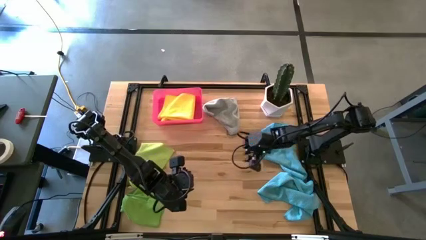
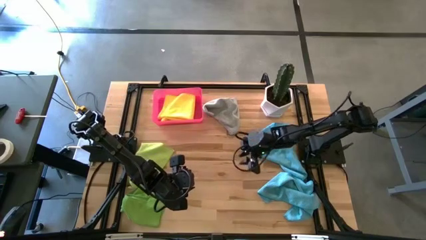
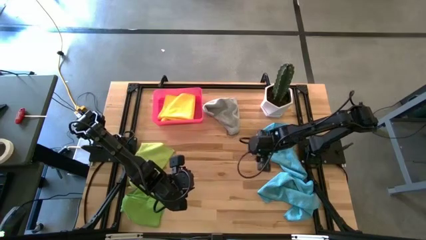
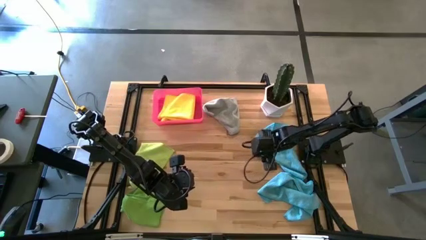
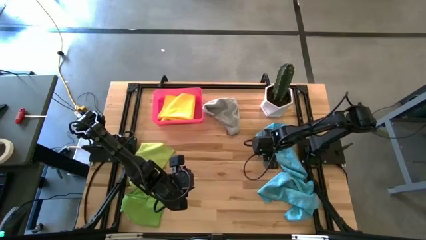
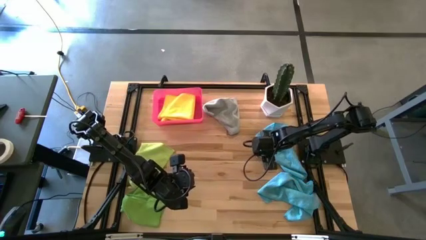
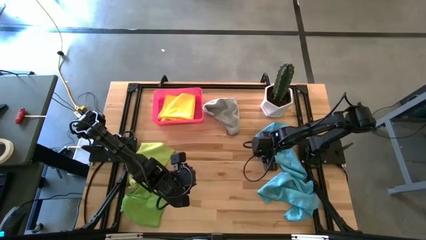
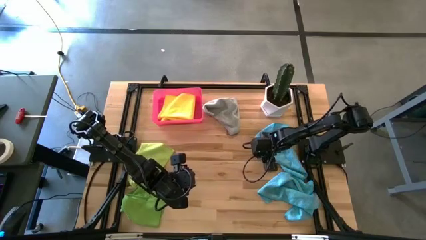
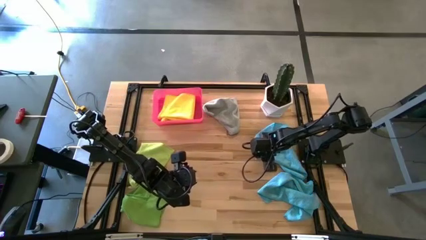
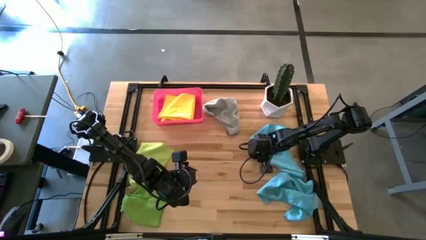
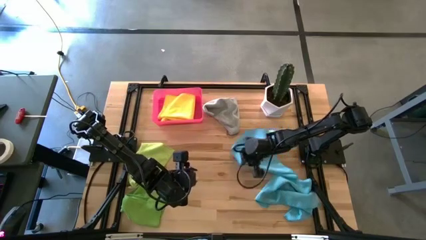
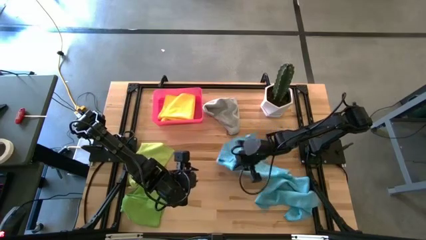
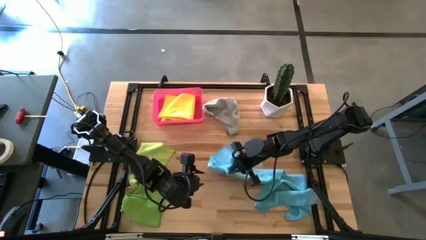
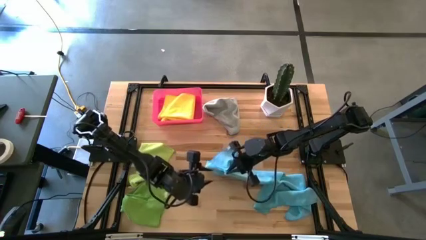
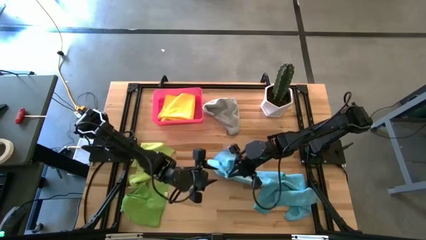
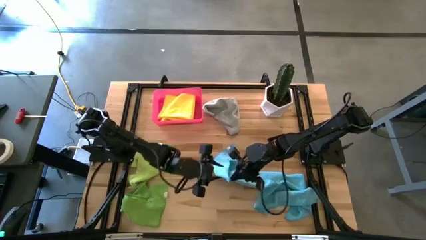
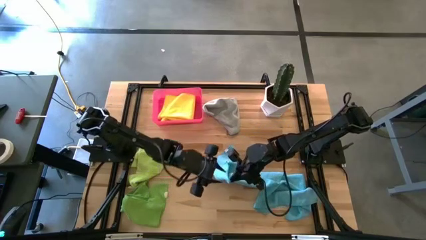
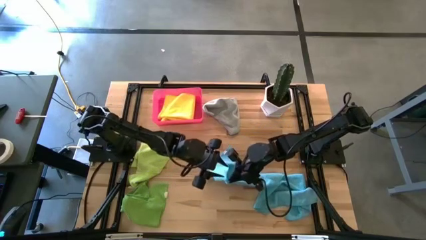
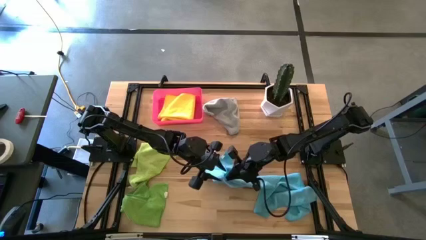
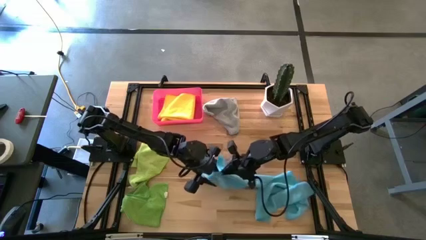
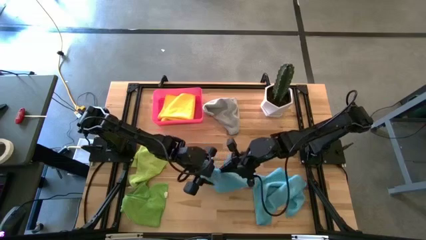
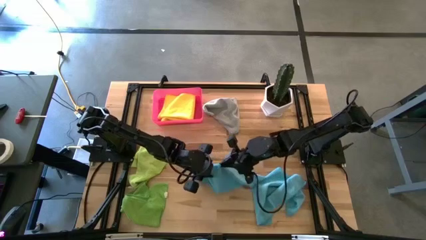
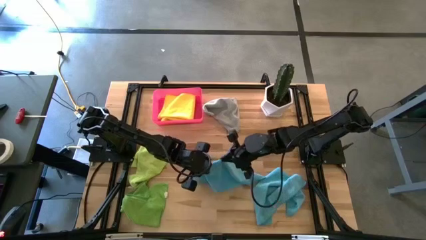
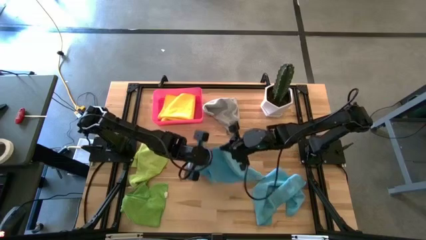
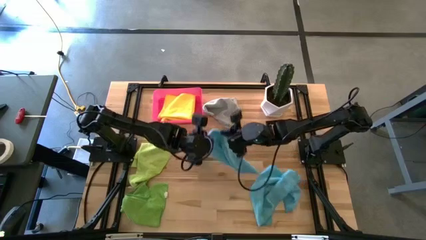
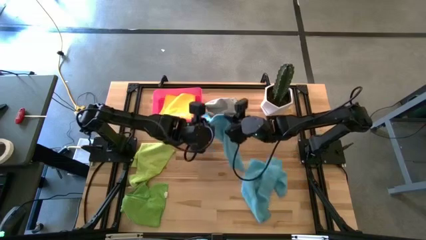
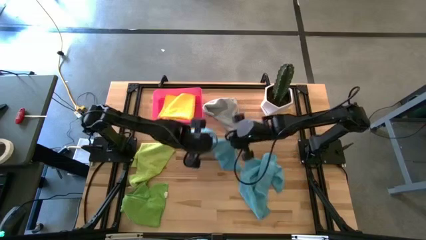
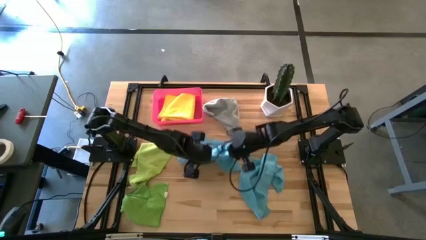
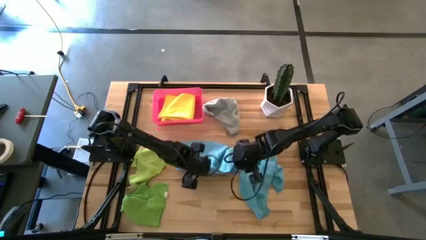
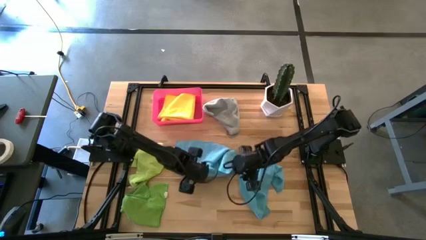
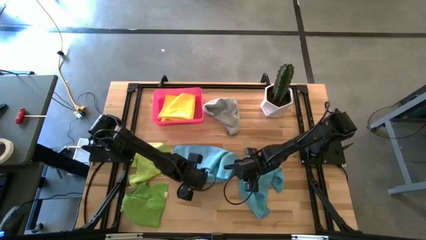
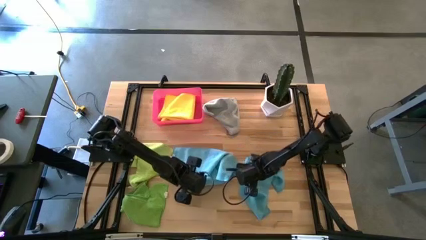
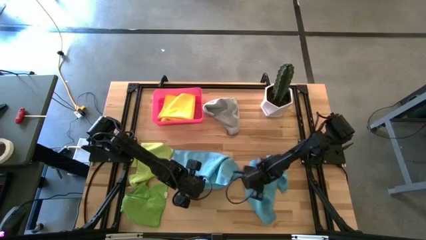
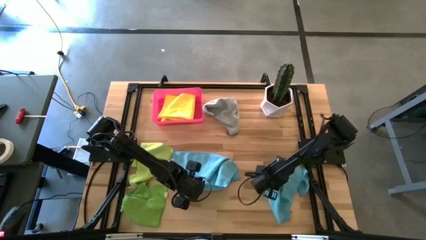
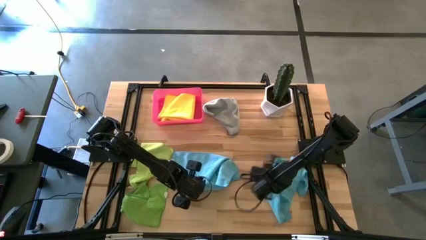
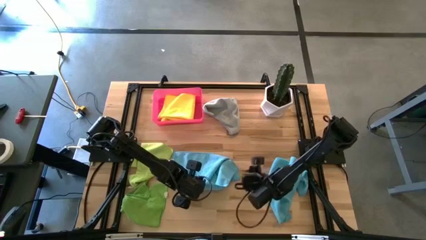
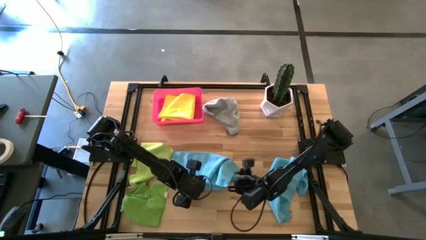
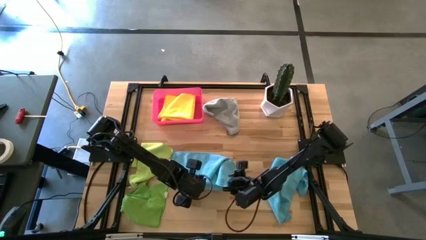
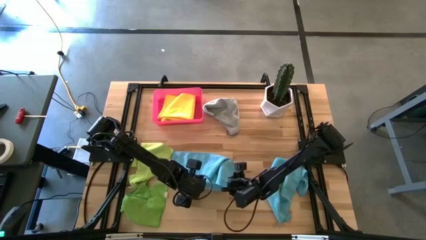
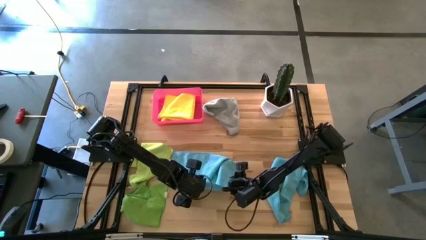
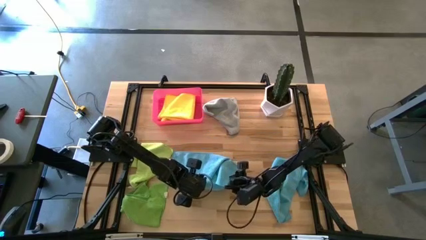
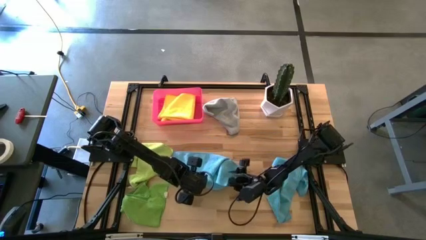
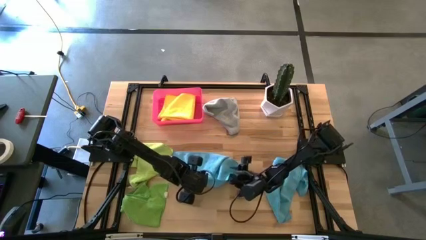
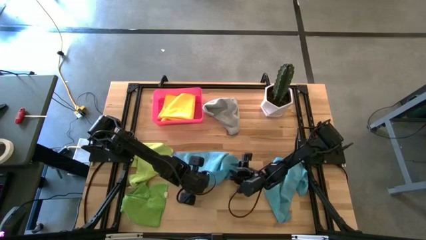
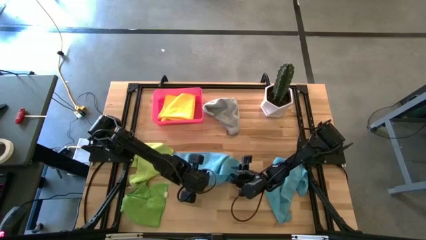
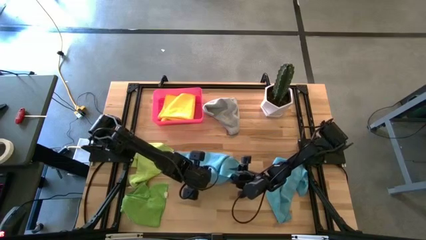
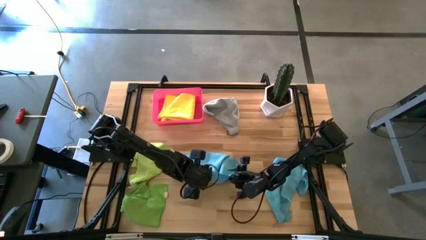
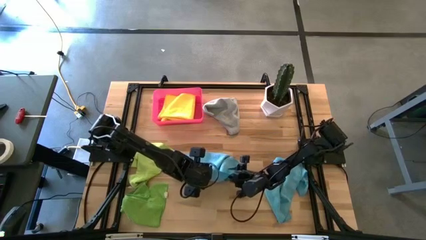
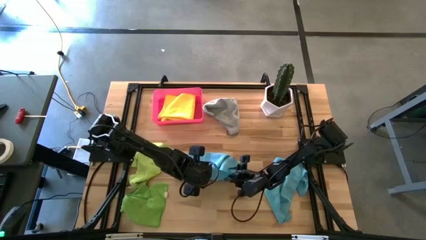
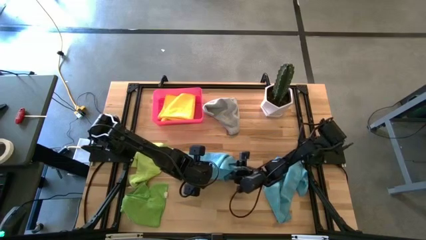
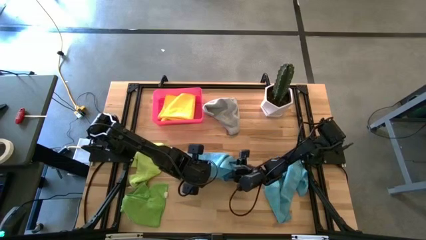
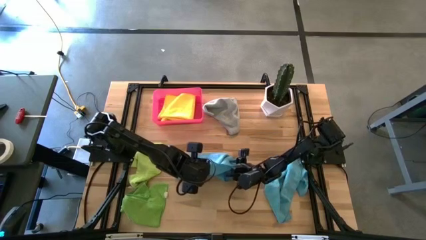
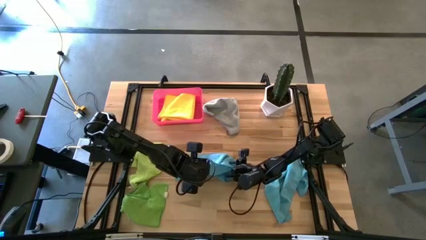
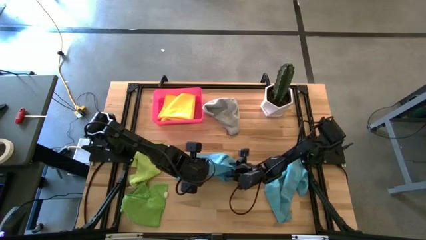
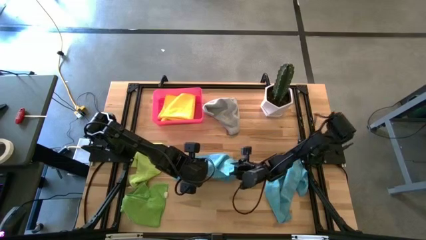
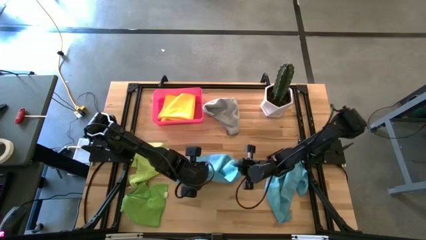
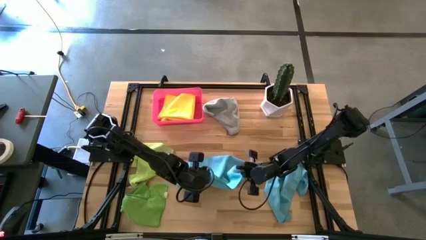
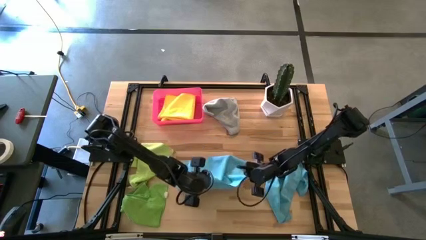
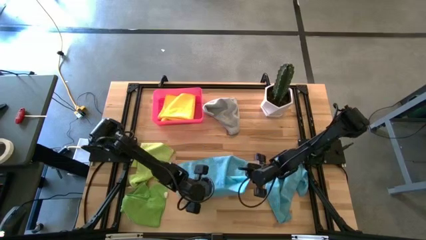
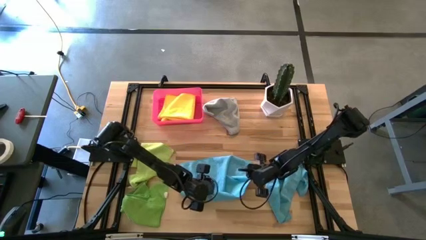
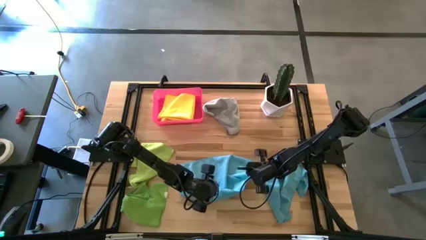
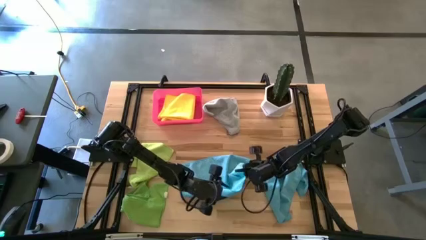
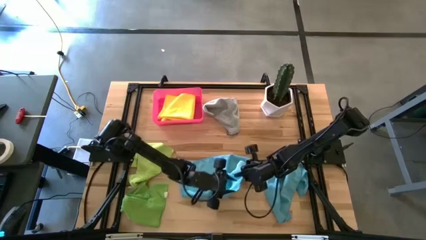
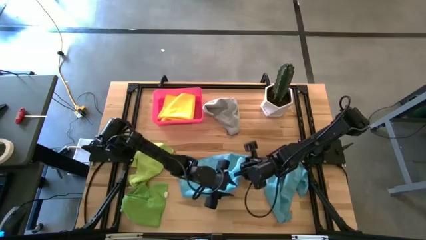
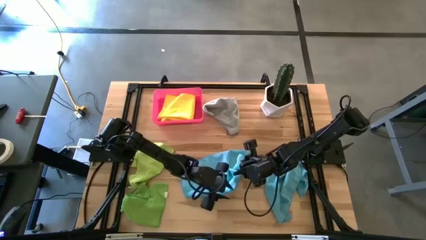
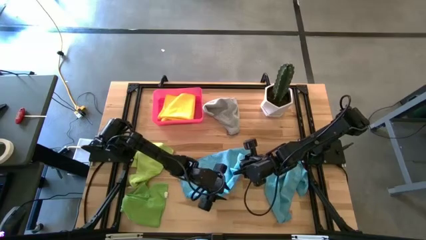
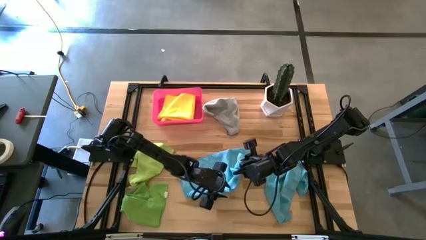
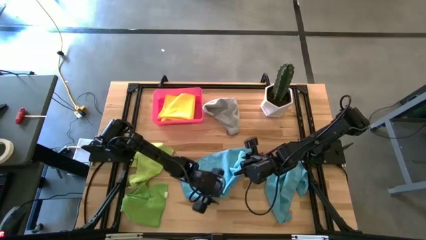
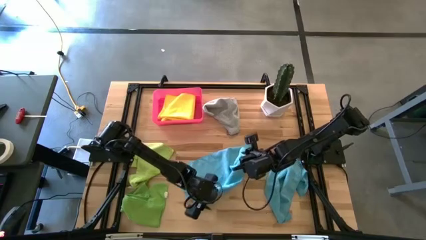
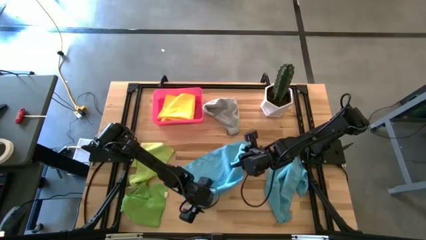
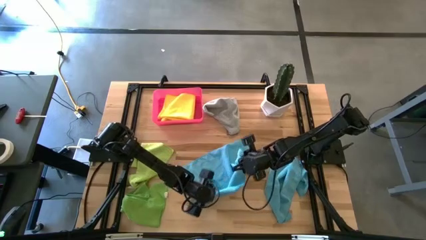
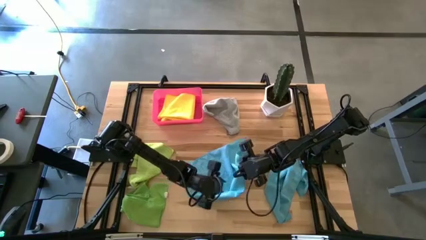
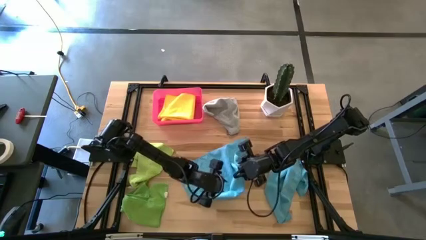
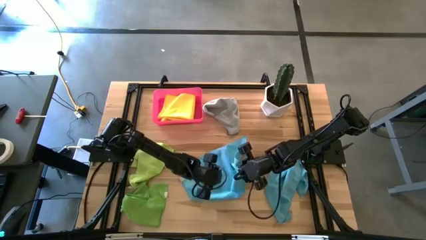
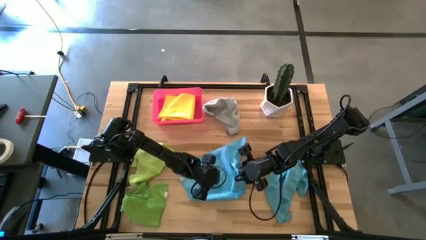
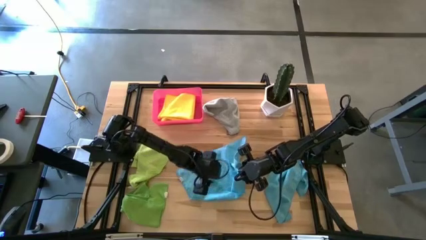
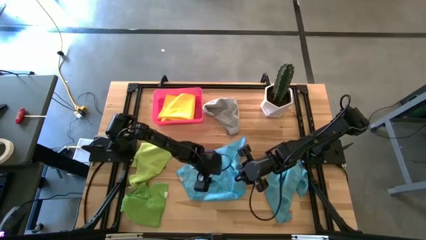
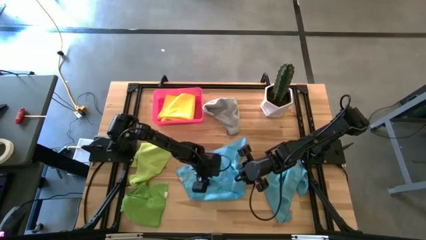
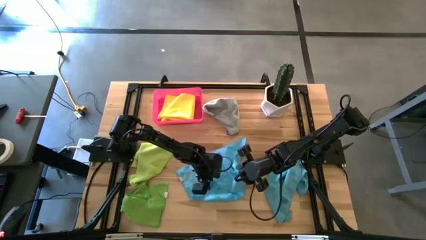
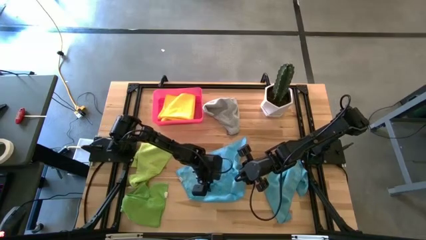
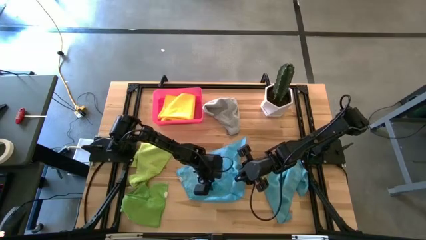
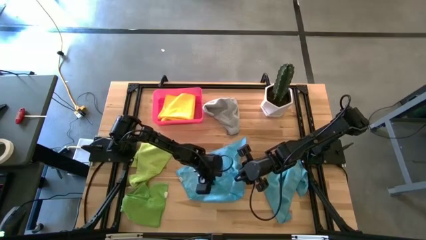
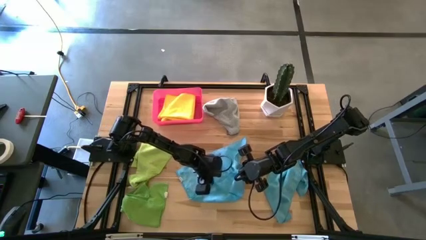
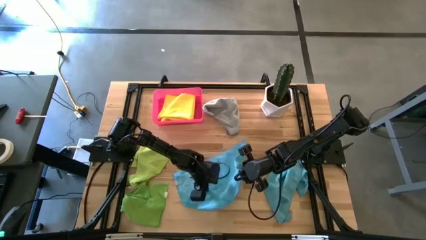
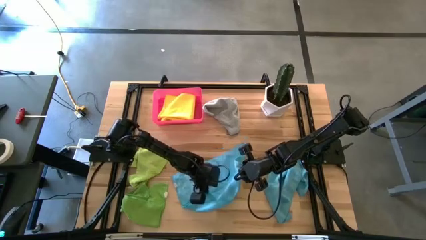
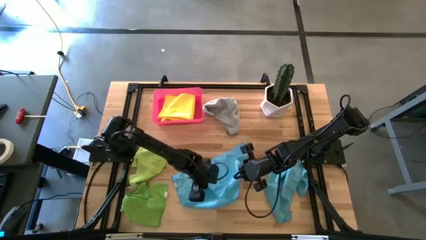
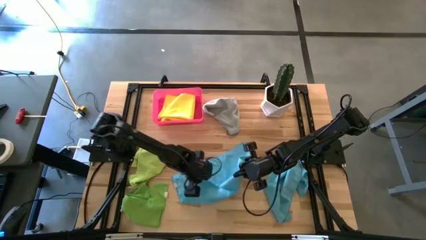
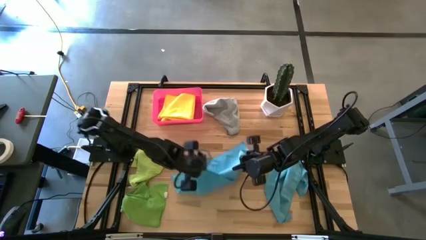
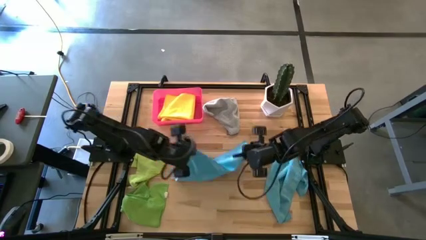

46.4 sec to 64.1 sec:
Task: Fold microfiber towels
Fold the top blue towel on the table
